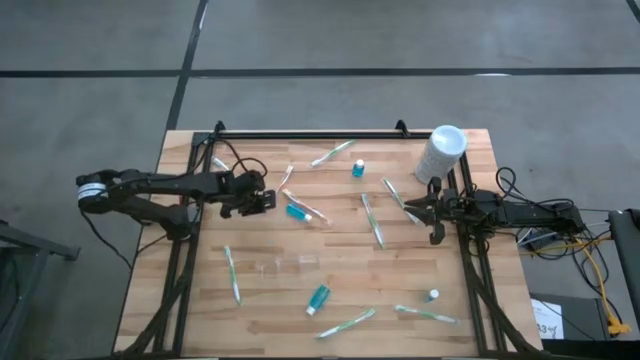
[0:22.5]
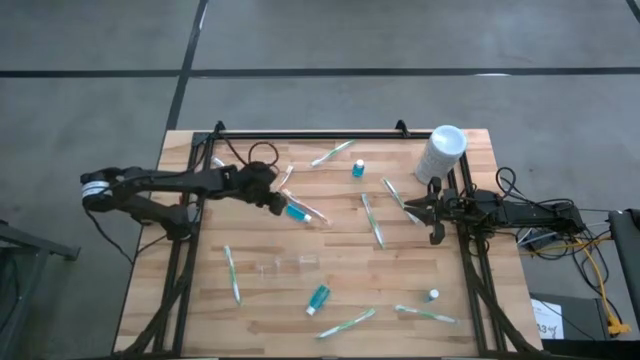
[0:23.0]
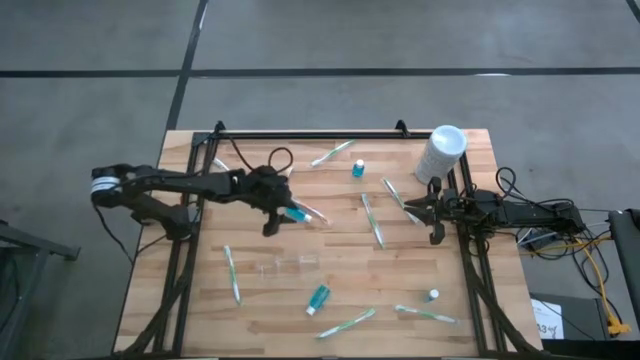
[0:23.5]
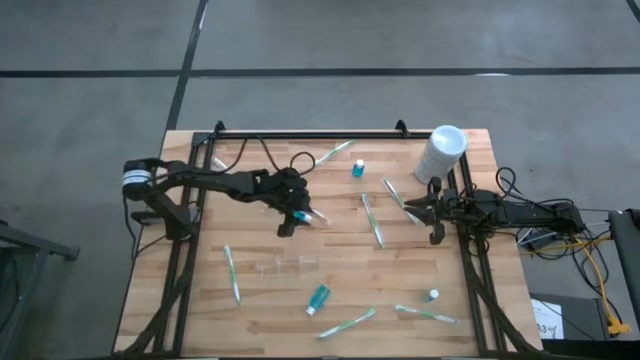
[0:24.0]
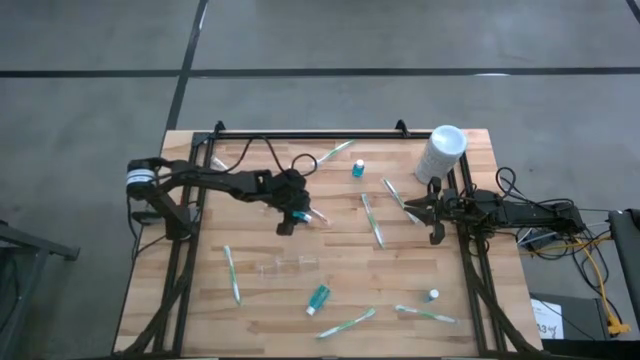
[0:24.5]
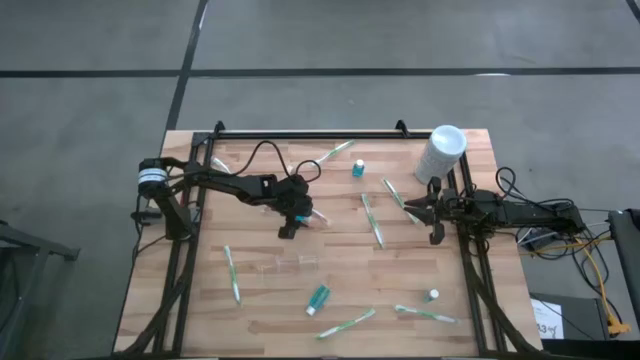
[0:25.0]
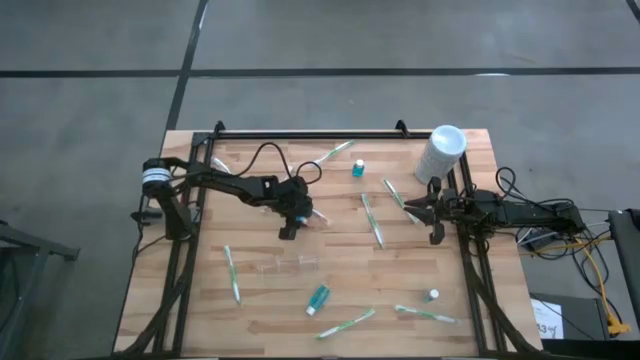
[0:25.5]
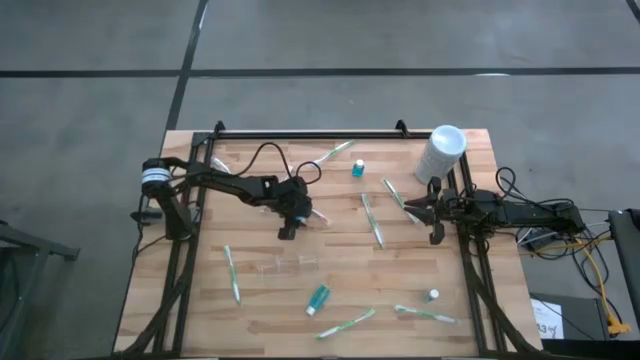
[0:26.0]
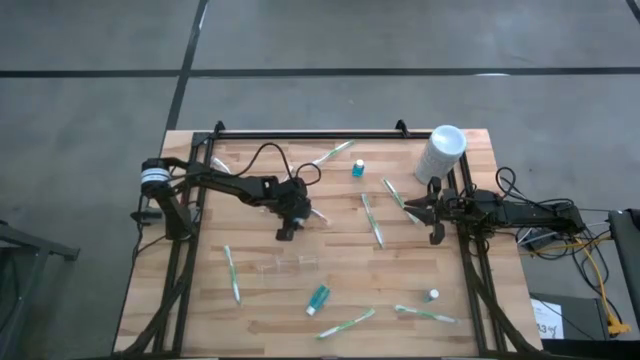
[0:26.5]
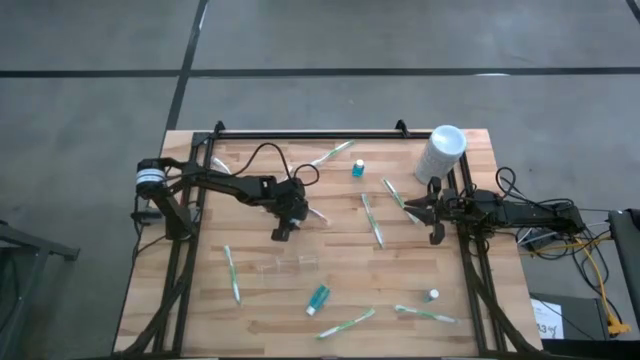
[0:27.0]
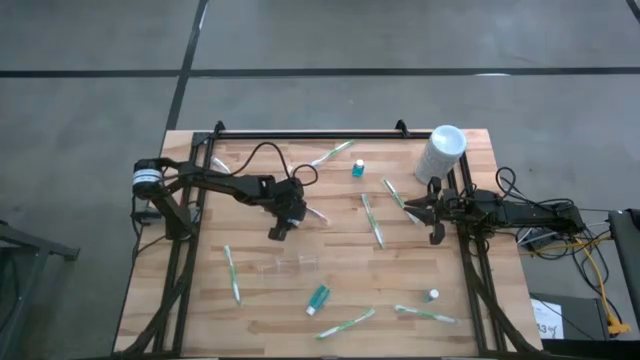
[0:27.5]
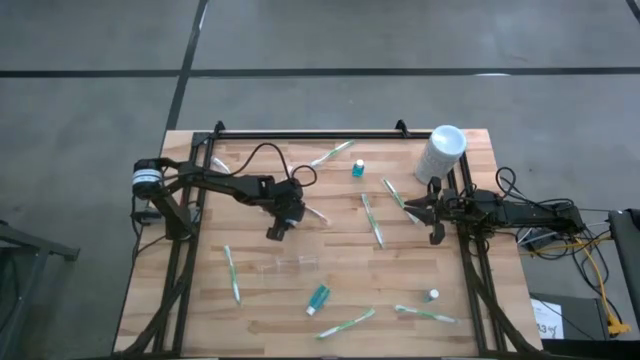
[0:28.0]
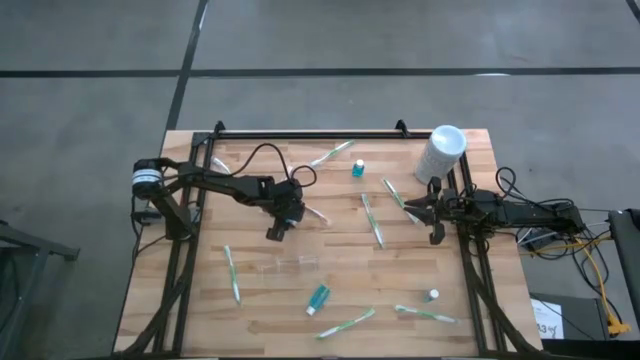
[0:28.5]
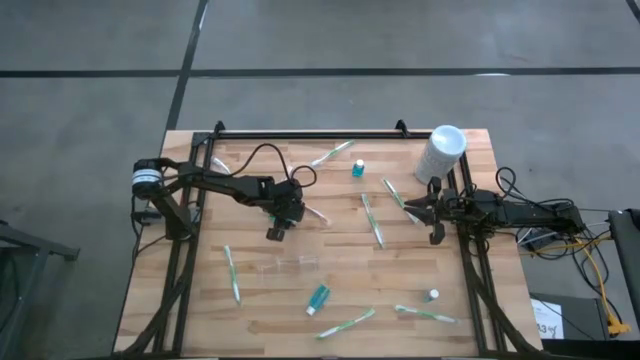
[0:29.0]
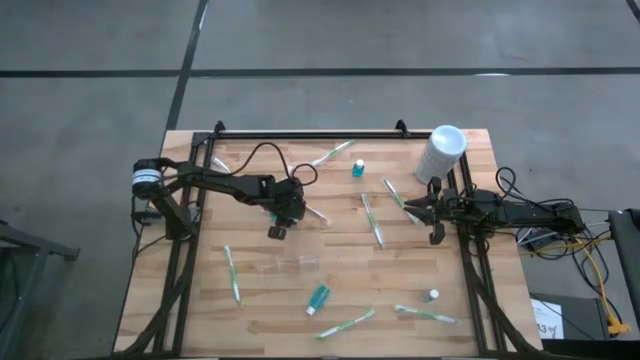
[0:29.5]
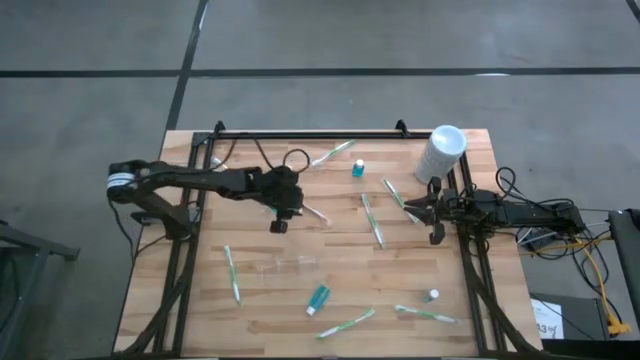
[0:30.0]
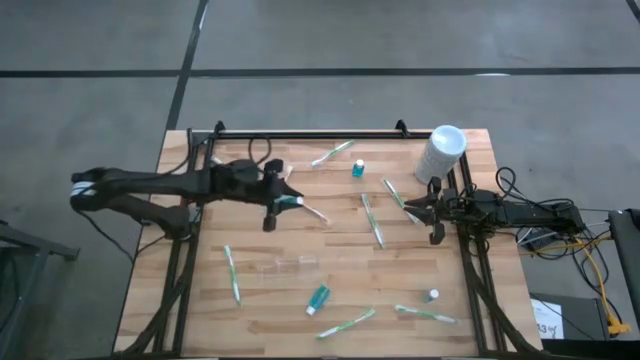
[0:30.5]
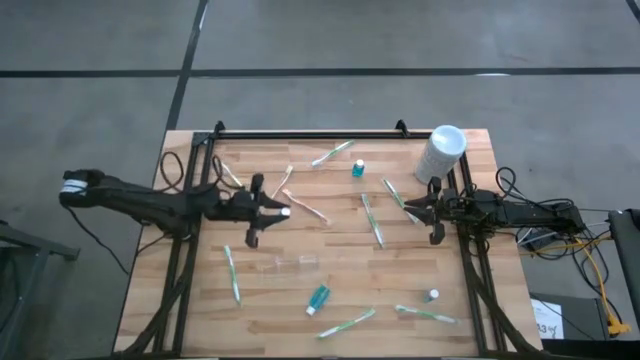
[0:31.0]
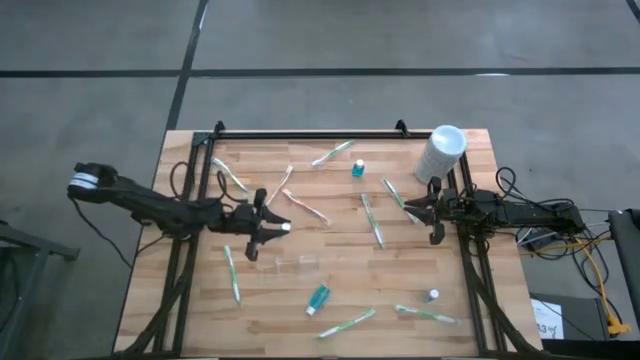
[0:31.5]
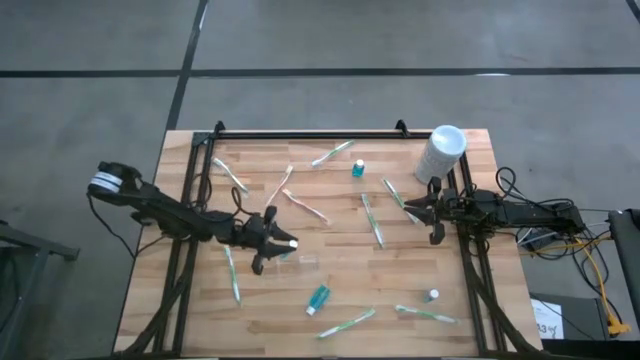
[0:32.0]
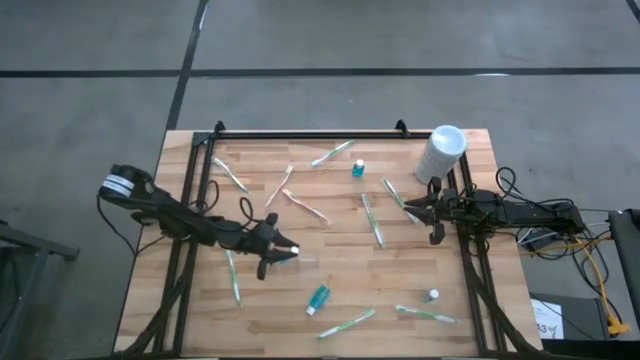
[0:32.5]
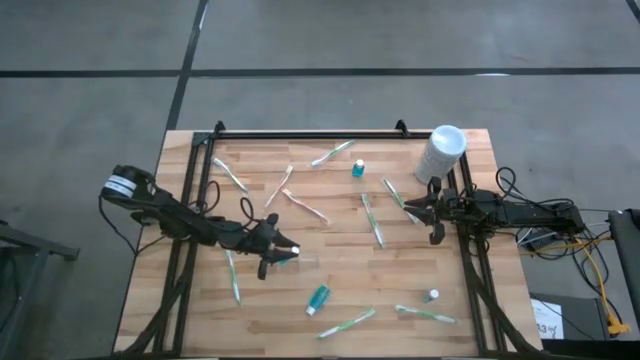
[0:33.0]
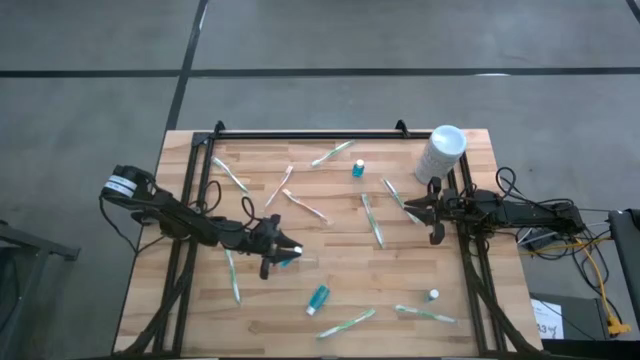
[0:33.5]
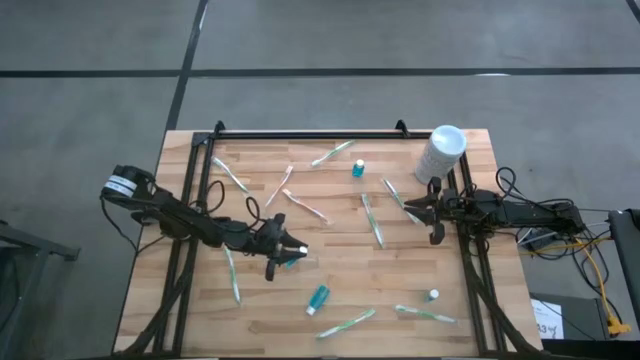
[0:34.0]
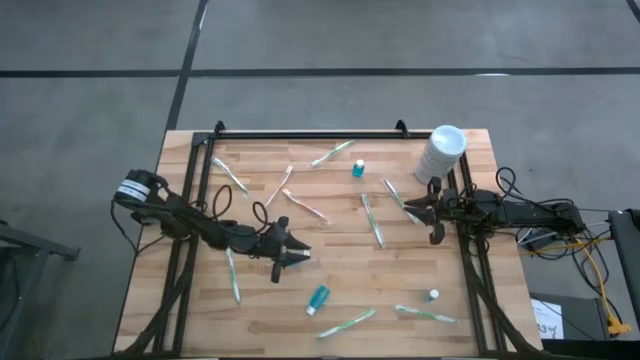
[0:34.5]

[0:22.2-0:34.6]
Task: Pick & Place toothbrushing station
Put the blue mouthwash into the transparent organizer

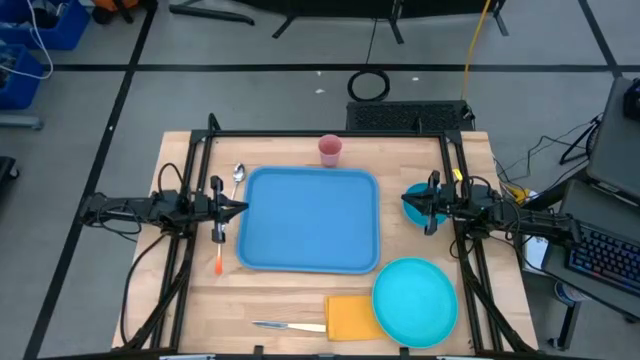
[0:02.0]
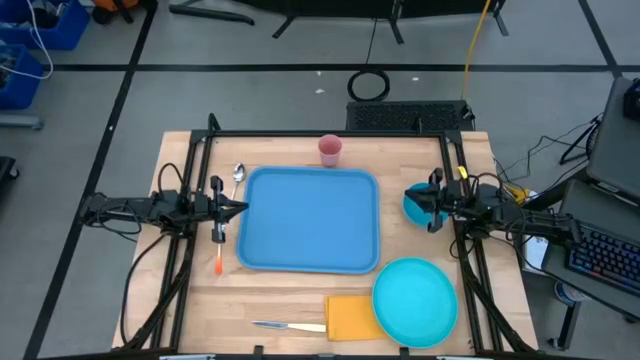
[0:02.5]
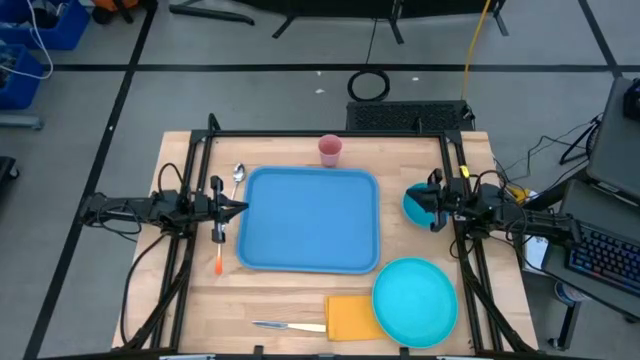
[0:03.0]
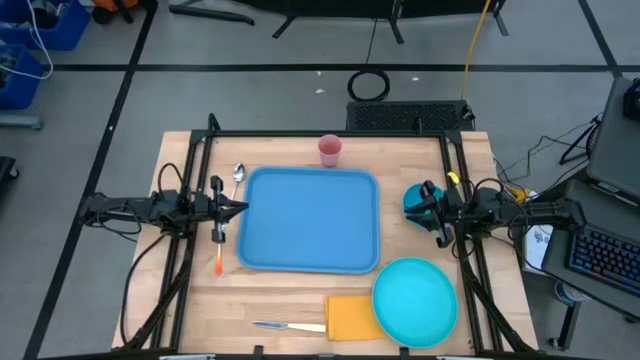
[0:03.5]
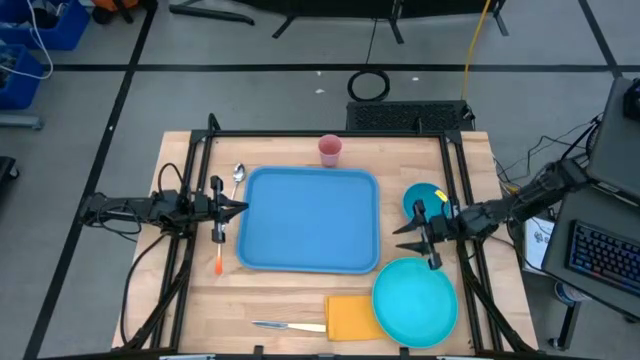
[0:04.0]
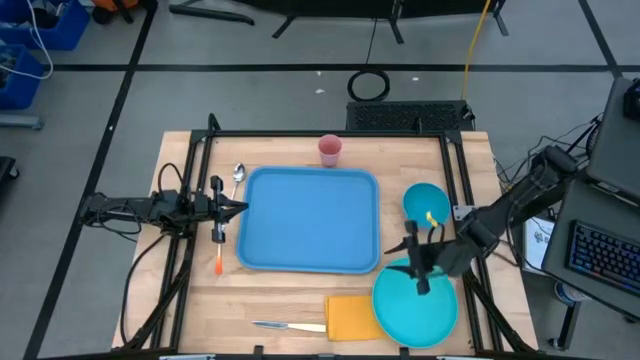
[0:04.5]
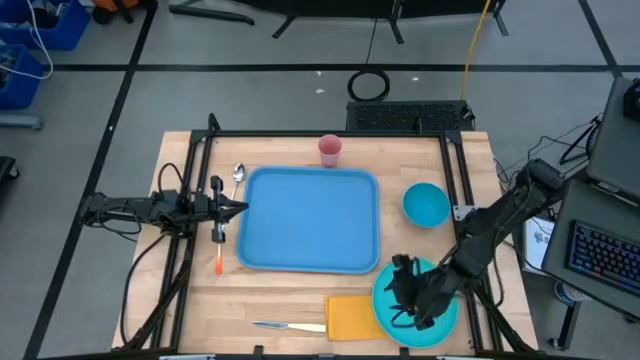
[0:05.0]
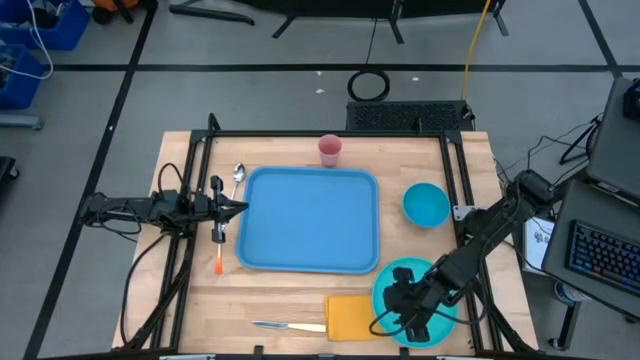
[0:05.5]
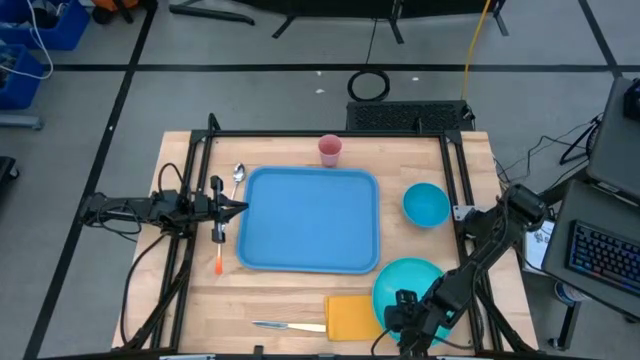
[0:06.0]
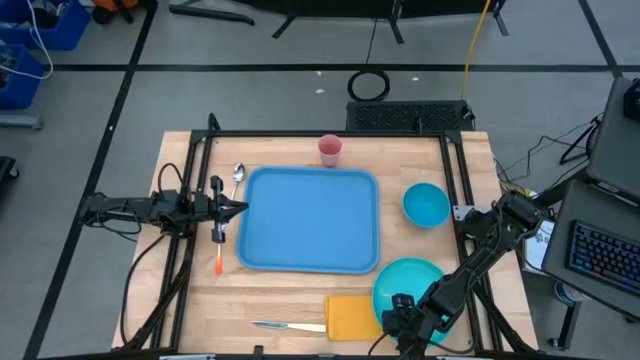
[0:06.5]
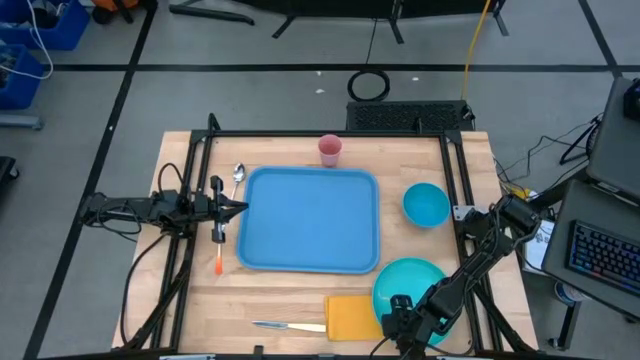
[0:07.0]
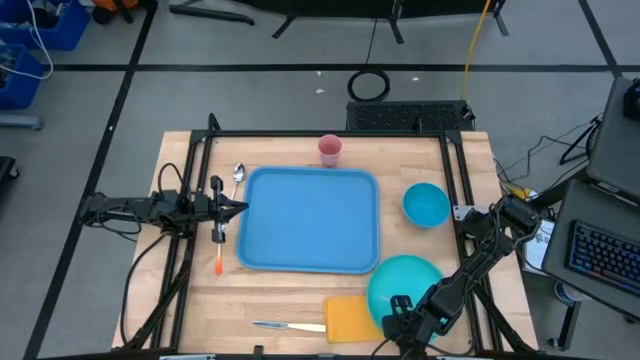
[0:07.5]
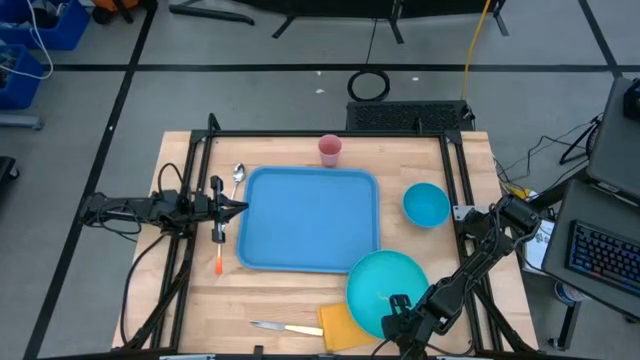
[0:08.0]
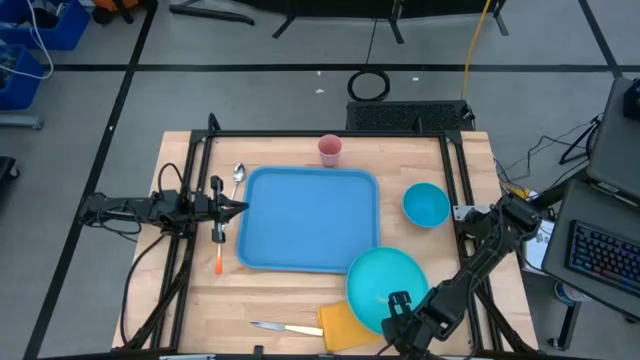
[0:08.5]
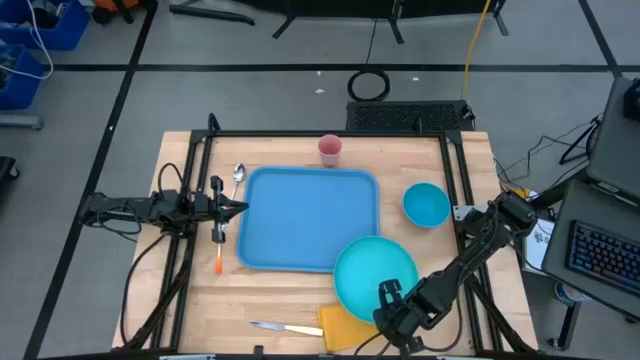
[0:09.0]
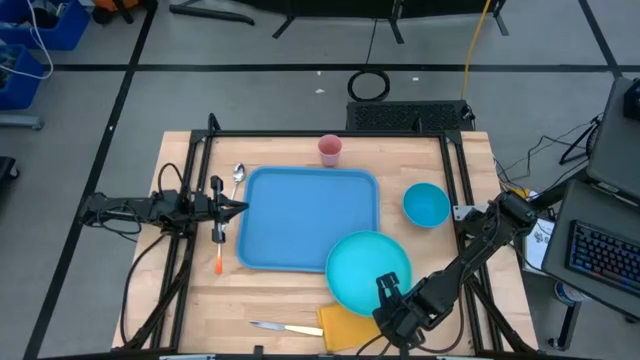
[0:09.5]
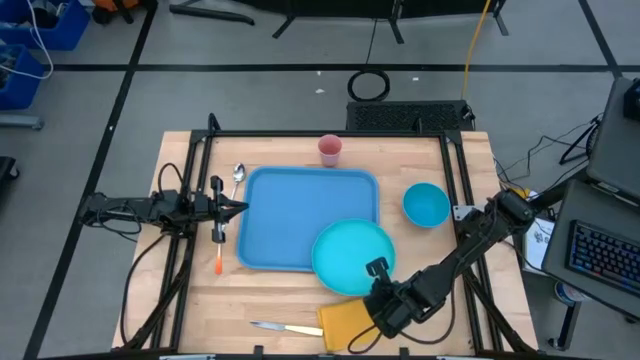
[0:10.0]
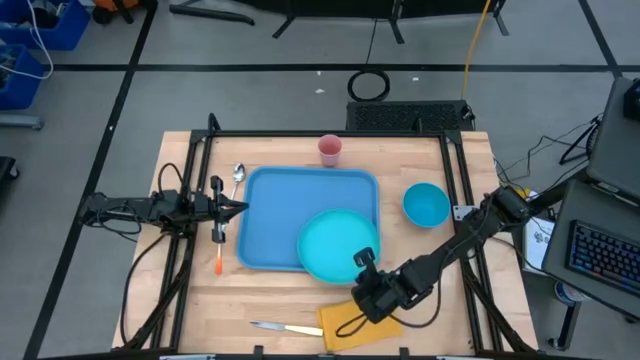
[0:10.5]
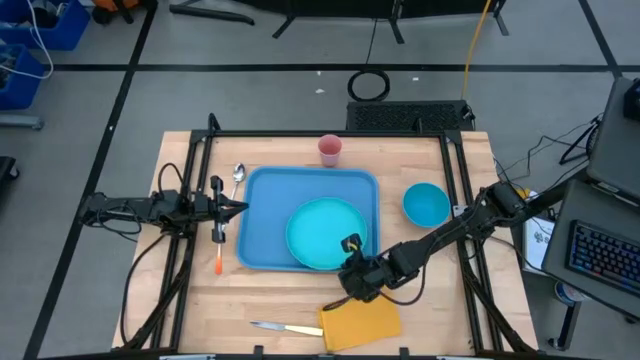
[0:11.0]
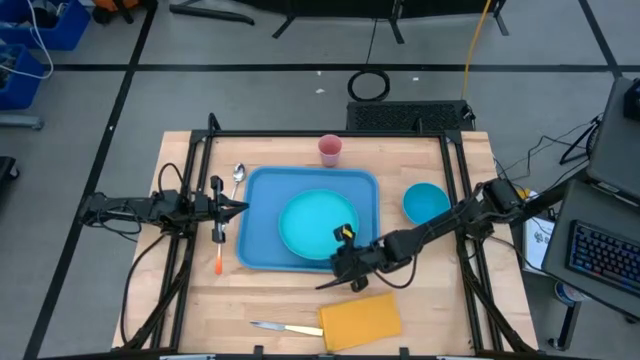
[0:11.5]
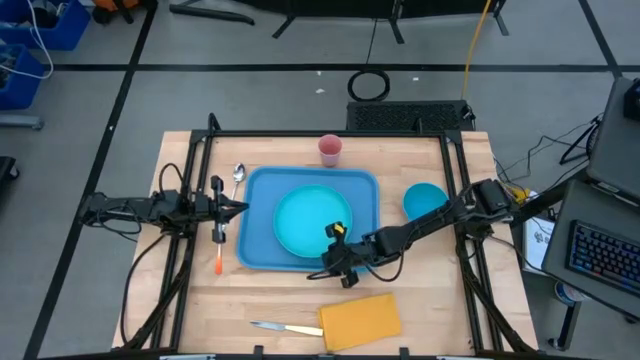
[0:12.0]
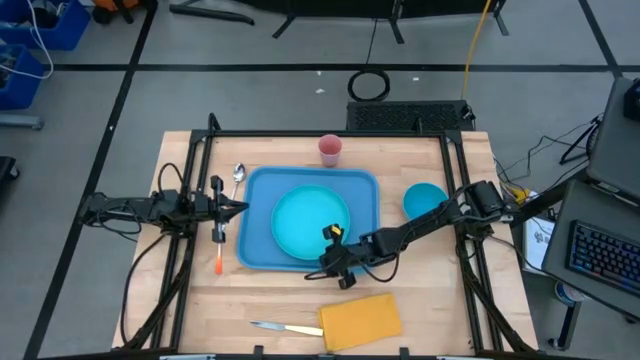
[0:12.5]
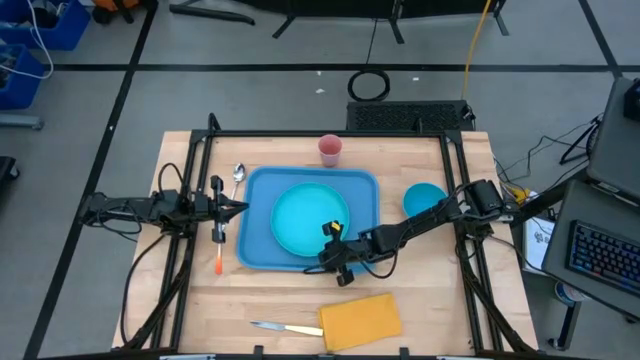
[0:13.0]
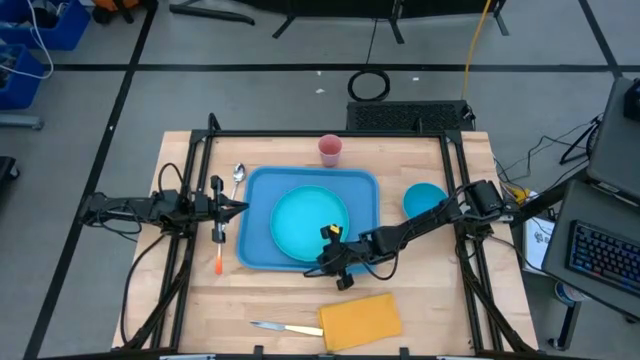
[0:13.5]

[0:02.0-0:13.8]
Task: Set up tray
Put the blue plate on the blue serving tray
